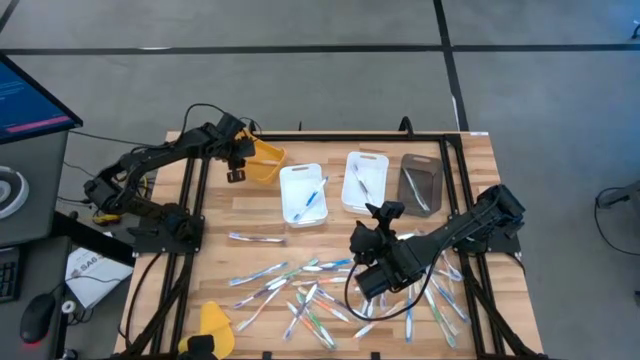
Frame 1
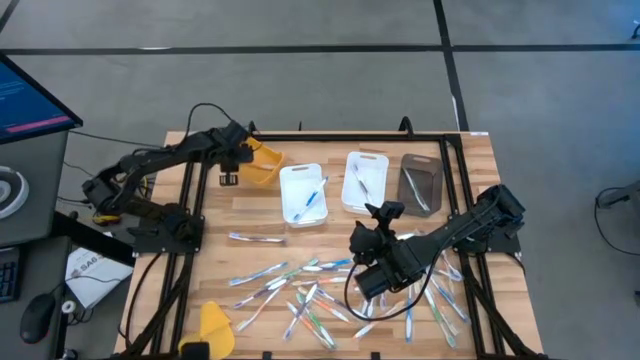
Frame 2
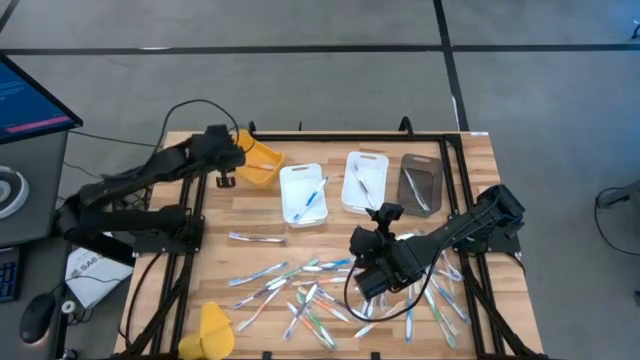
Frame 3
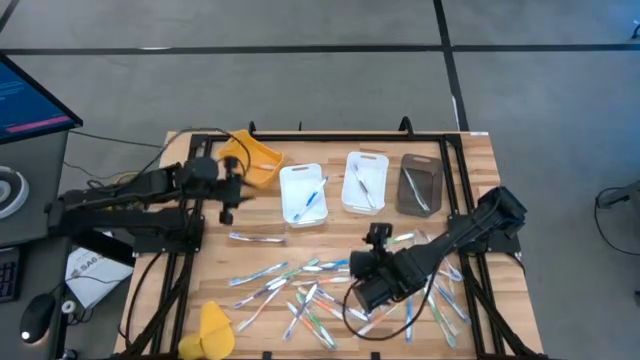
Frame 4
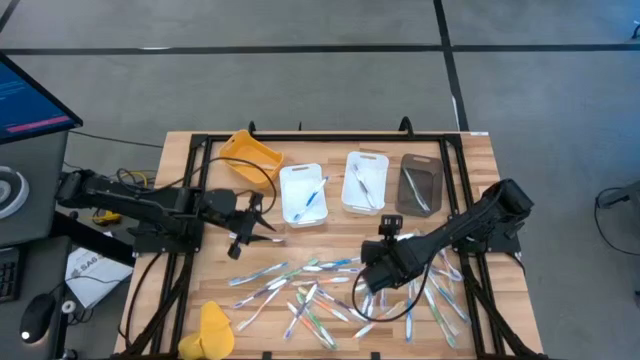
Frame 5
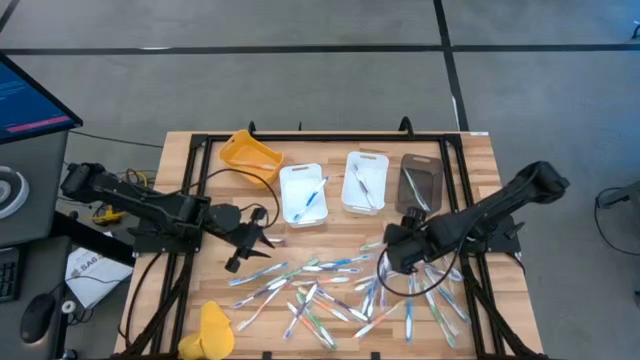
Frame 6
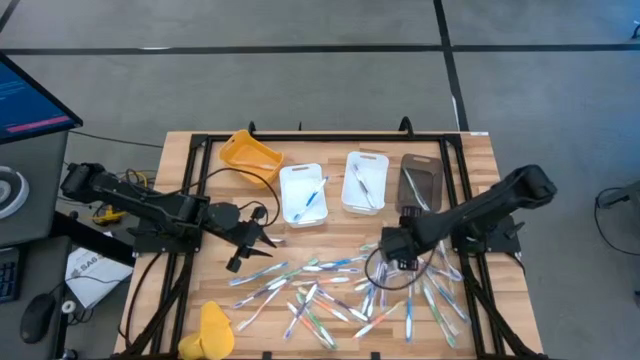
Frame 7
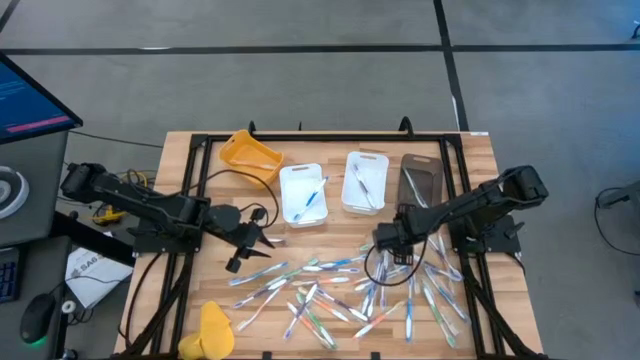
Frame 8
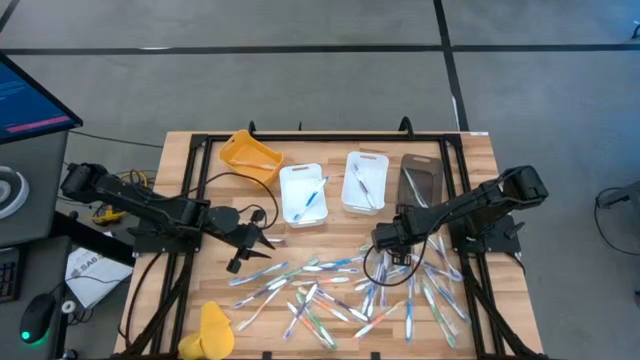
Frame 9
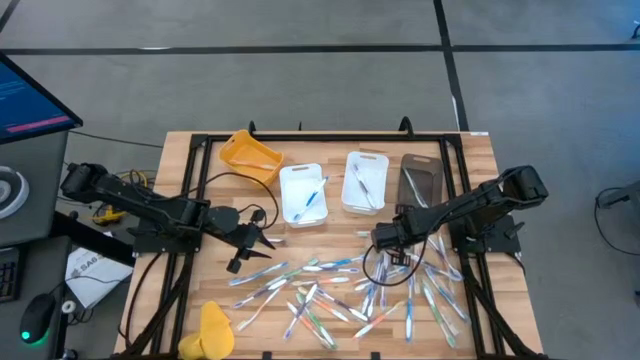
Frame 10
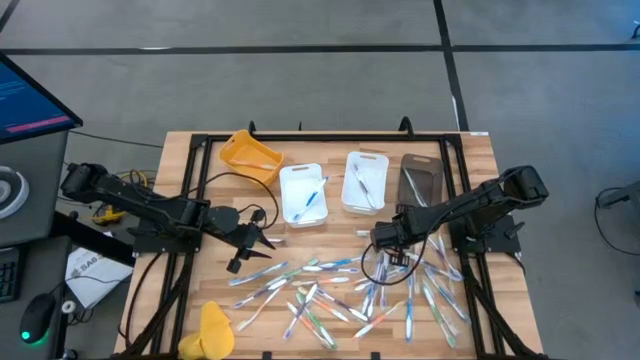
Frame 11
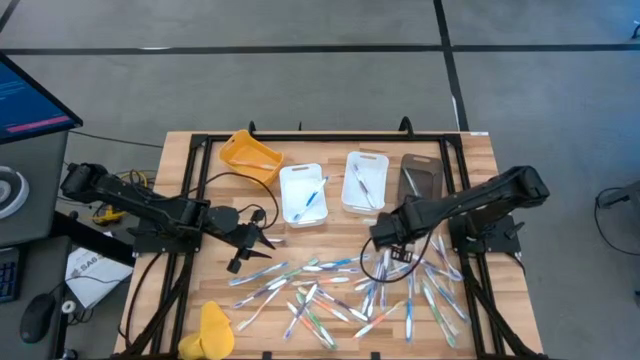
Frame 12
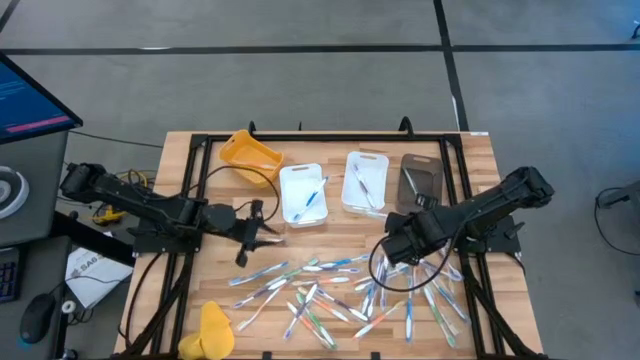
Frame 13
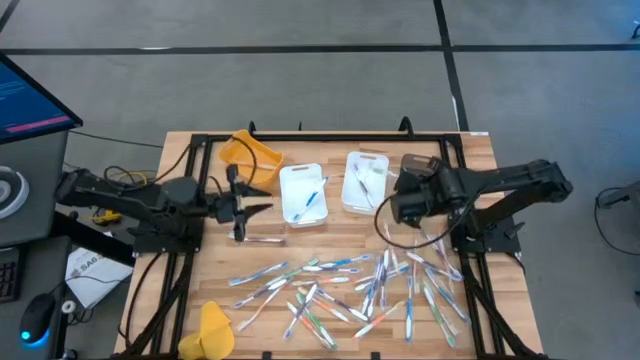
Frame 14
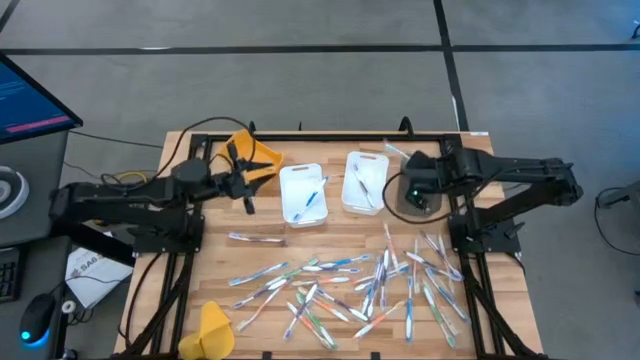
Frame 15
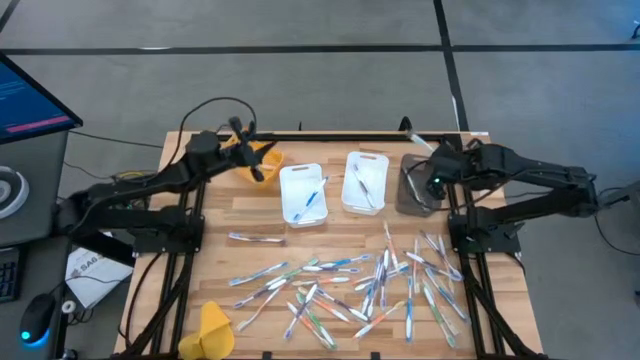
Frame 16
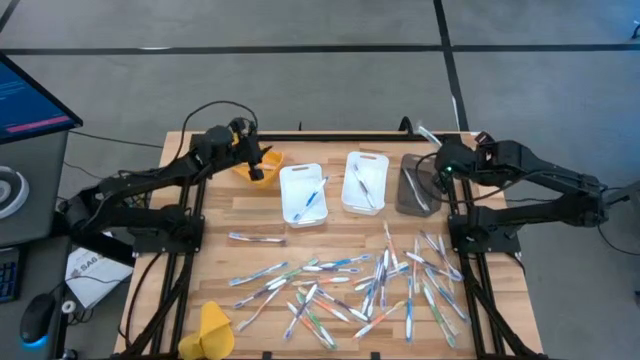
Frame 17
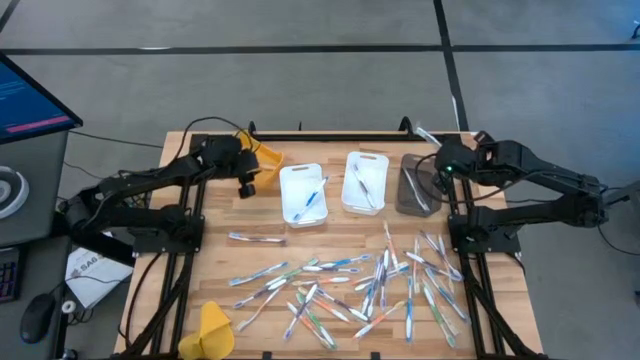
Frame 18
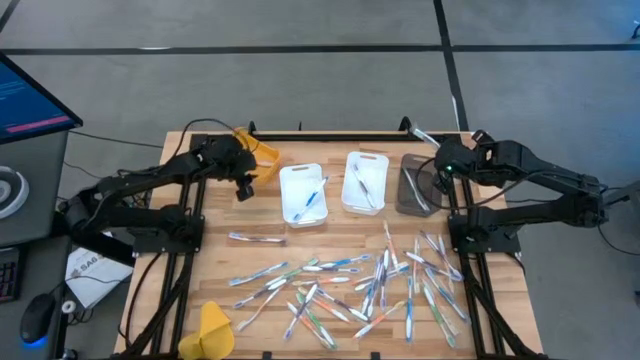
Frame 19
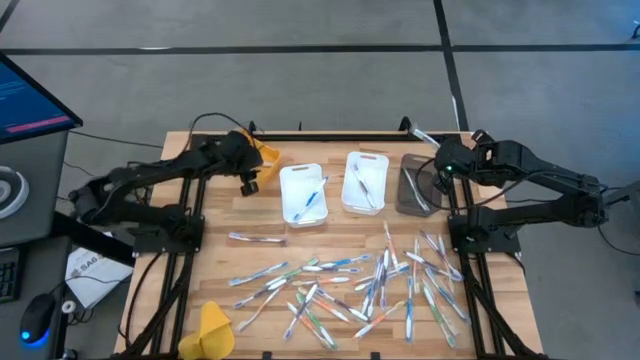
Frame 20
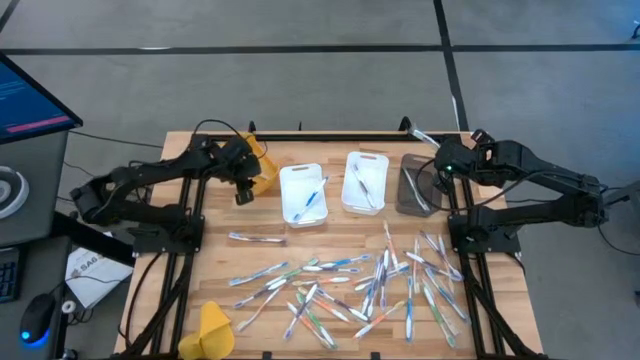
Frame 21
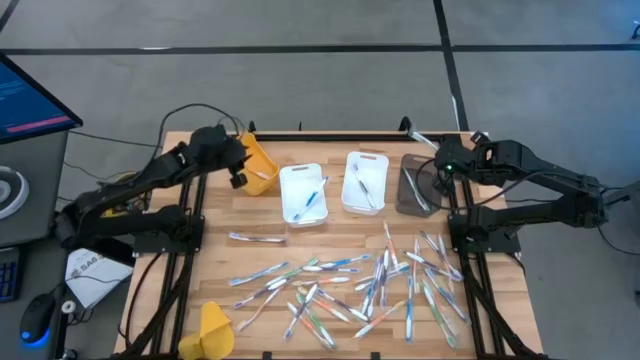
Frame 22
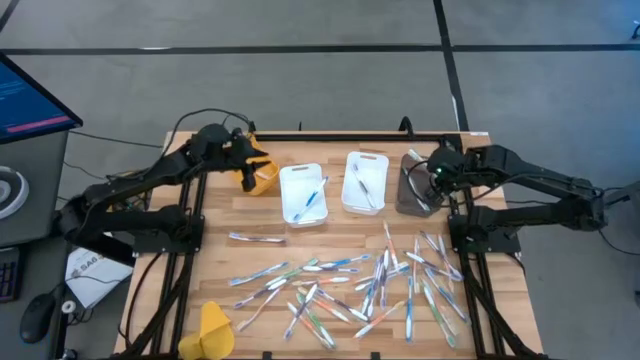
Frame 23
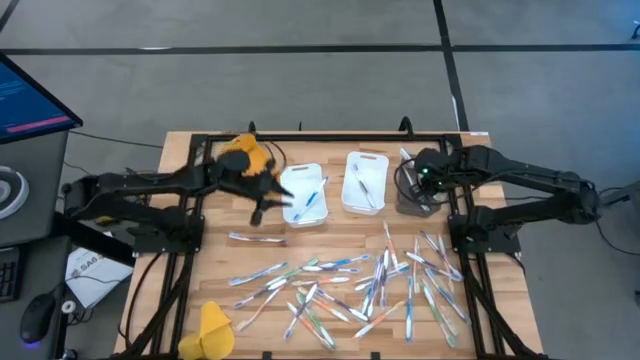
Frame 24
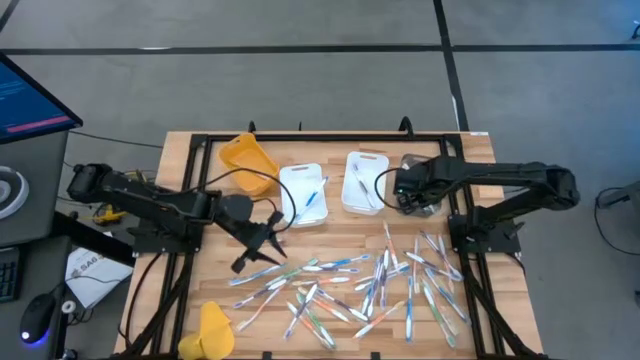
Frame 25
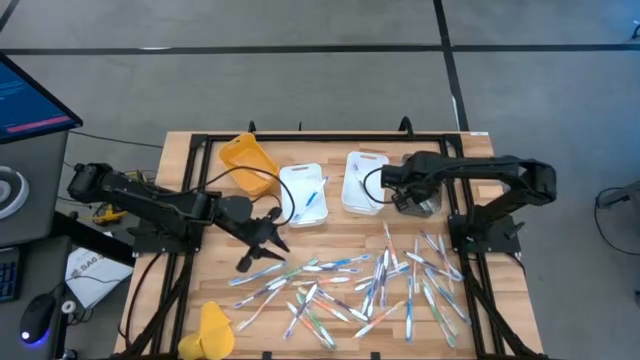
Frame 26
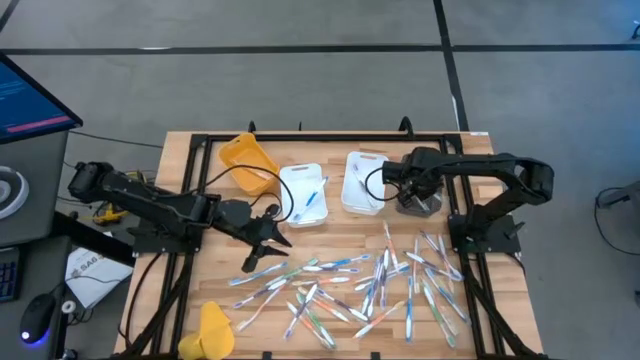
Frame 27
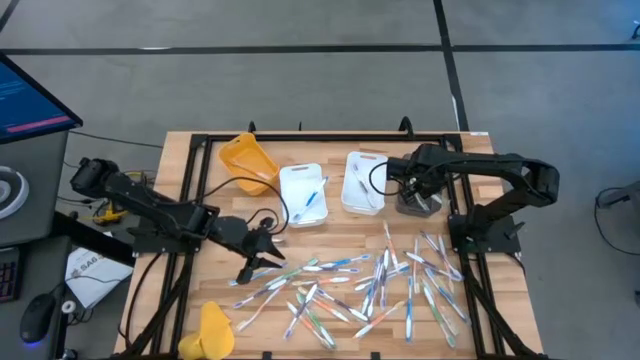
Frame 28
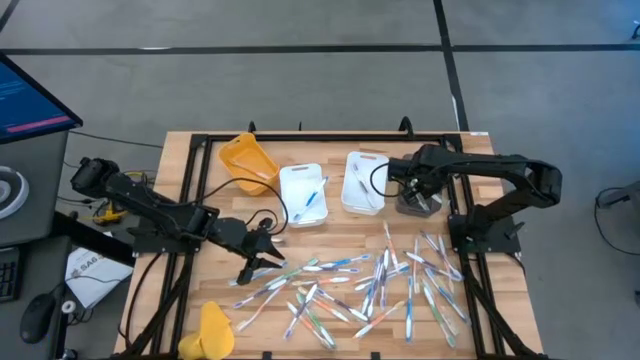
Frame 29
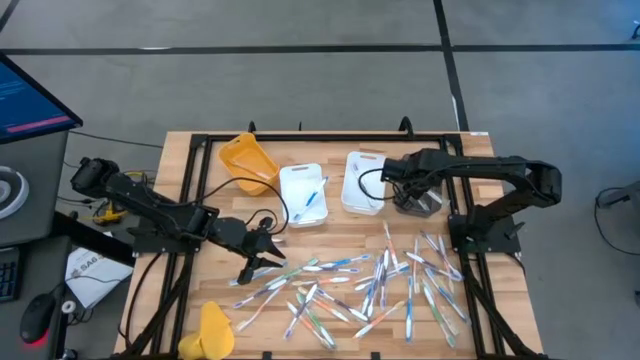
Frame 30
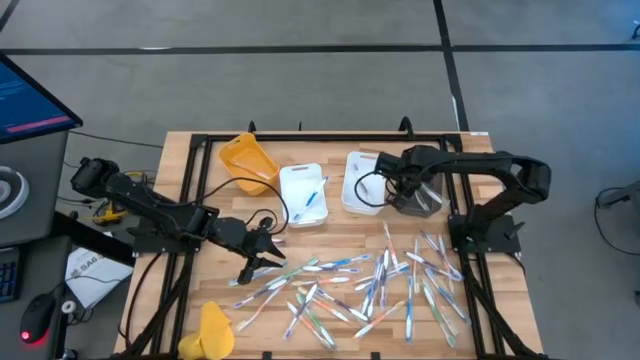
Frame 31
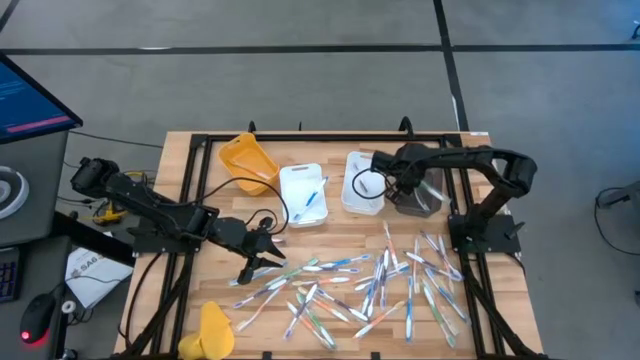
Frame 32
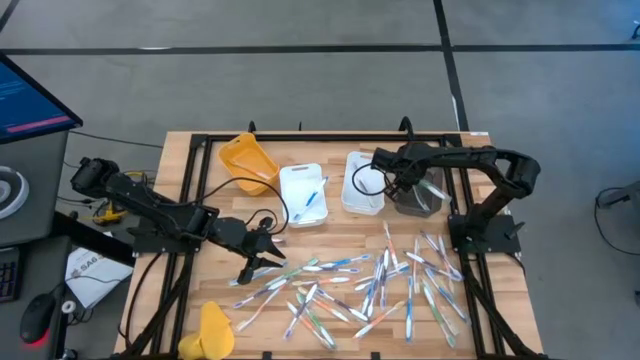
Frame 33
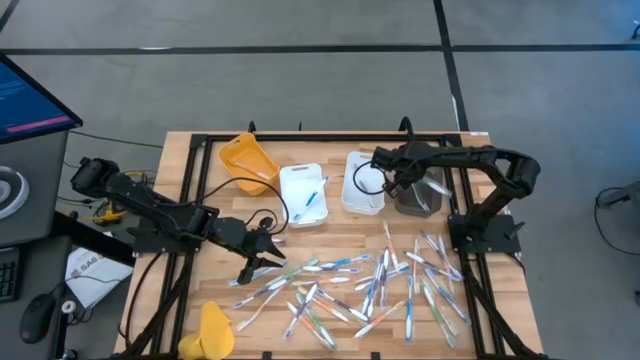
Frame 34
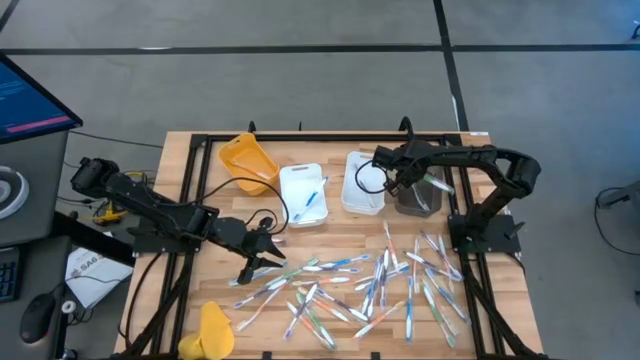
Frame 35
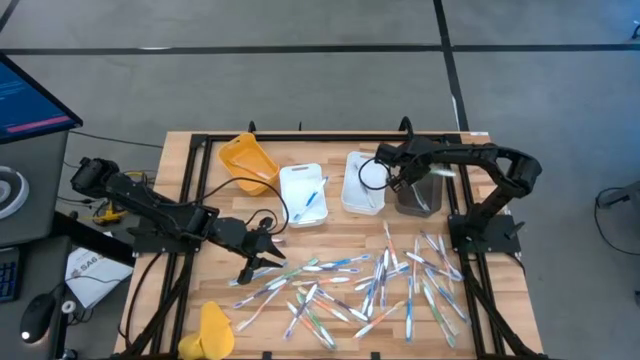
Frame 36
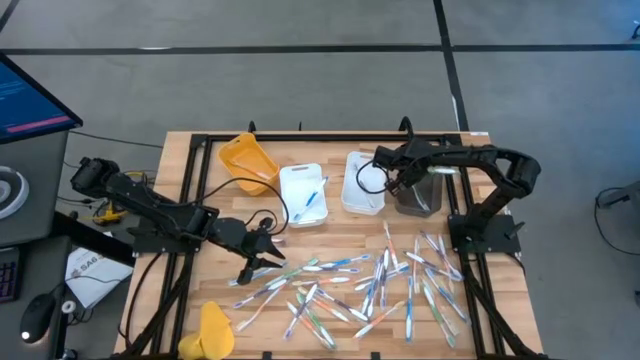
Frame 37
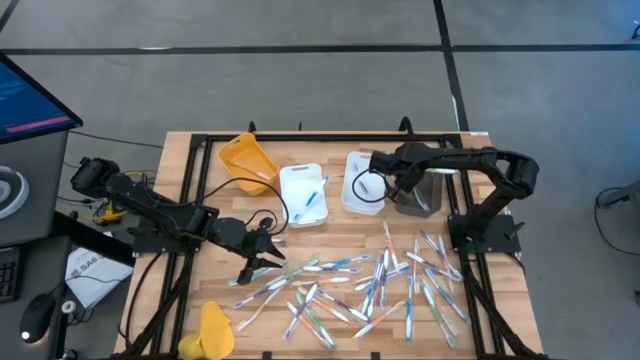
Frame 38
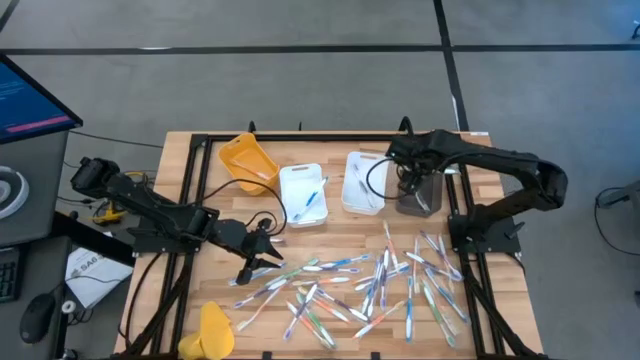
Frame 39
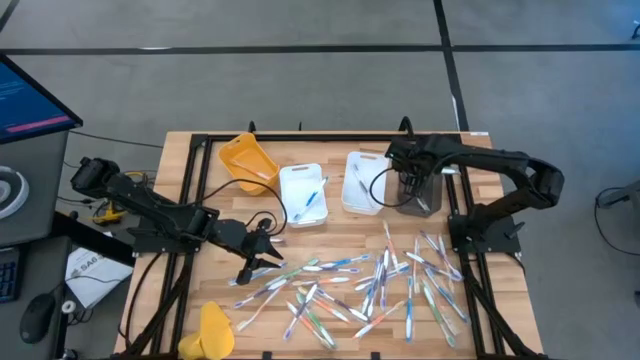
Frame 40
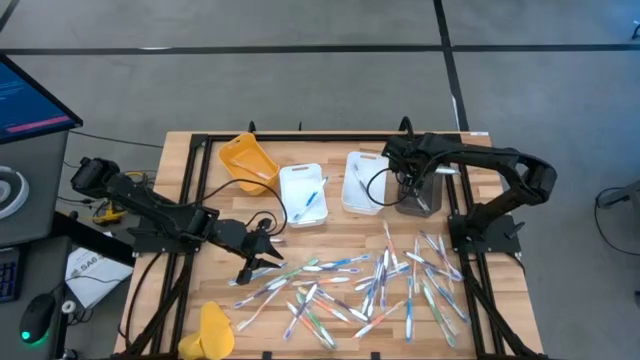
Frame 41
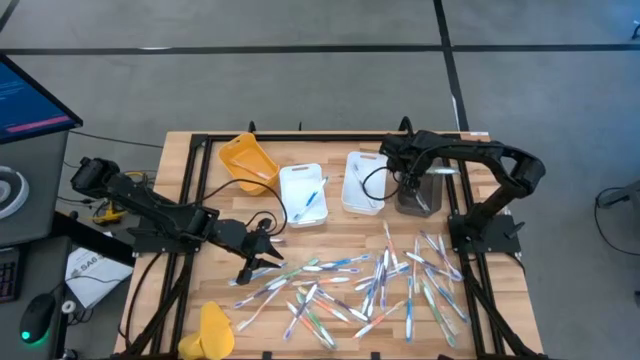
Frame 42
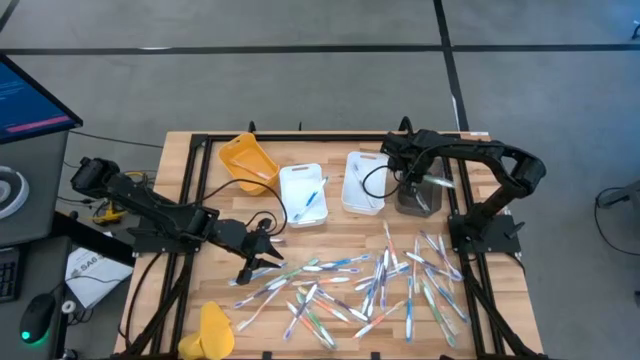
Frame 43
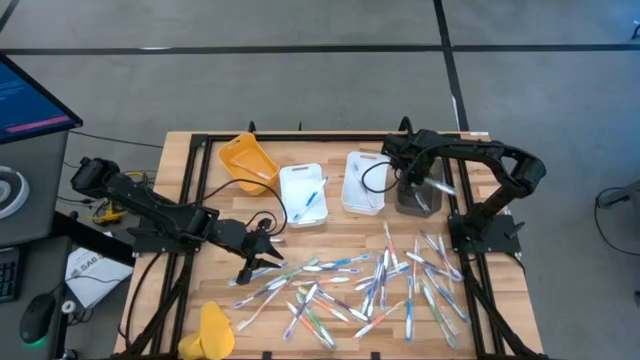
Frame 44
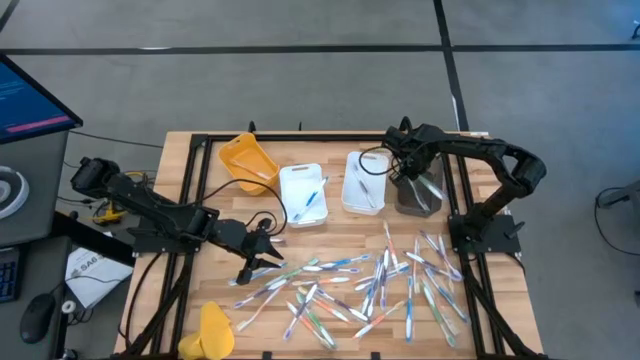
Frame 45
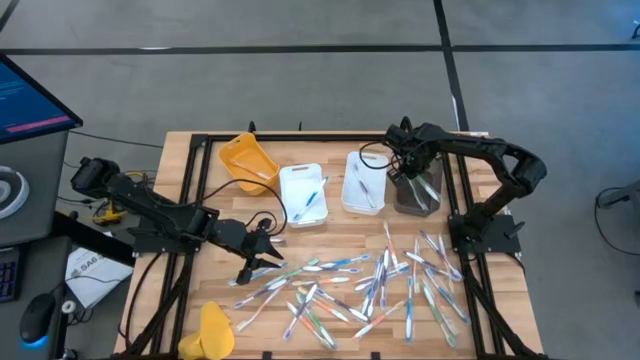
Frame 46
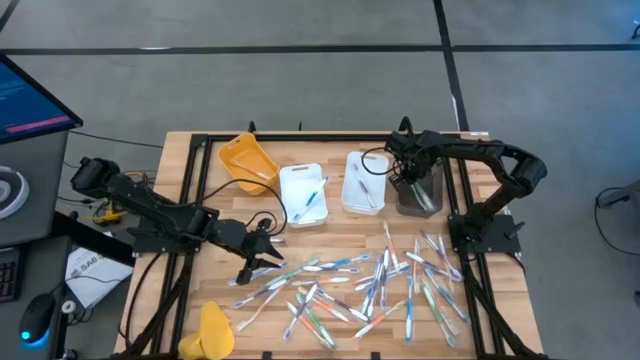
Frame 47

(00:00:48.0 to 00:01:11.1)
Task: Pick & Place Toothbrushes
Put the green toothbrush into the black bin
